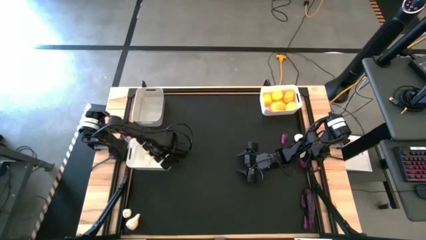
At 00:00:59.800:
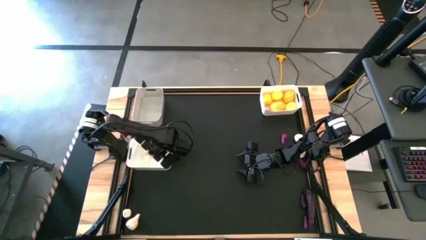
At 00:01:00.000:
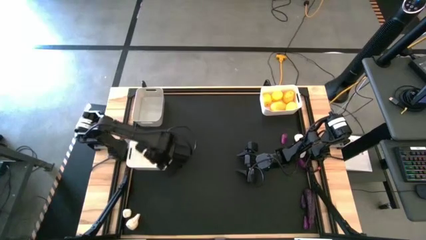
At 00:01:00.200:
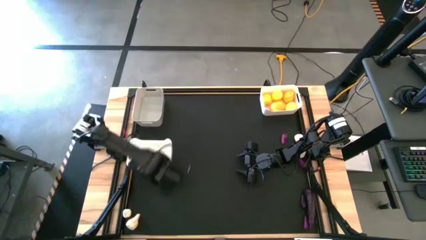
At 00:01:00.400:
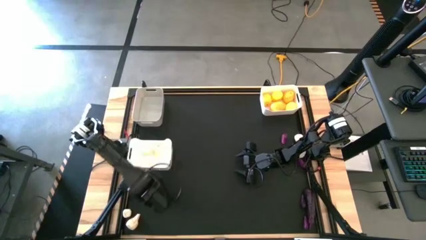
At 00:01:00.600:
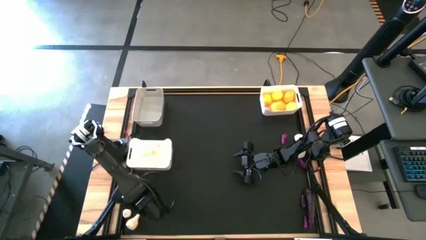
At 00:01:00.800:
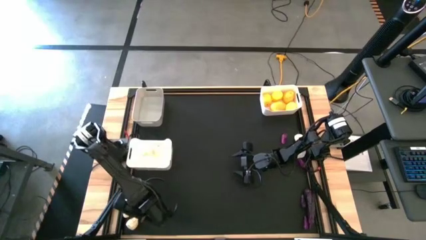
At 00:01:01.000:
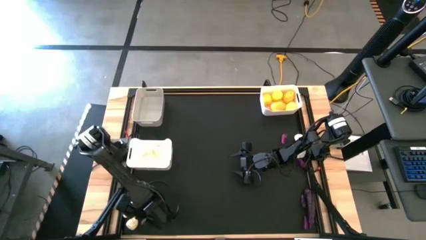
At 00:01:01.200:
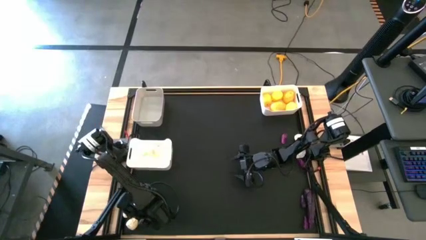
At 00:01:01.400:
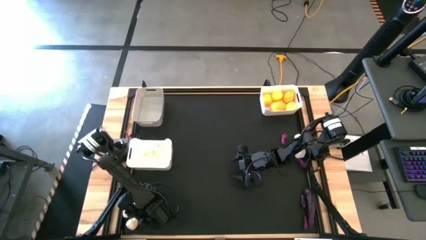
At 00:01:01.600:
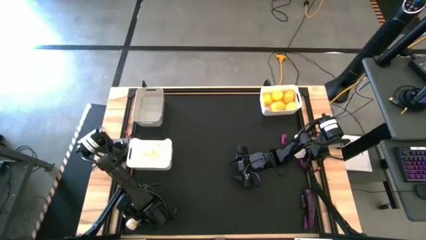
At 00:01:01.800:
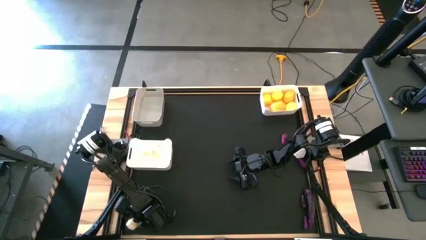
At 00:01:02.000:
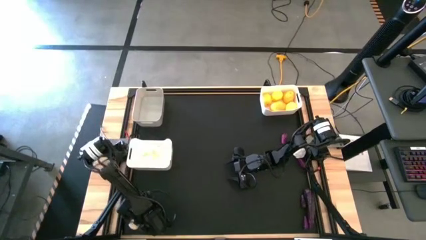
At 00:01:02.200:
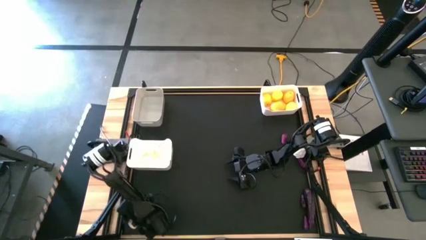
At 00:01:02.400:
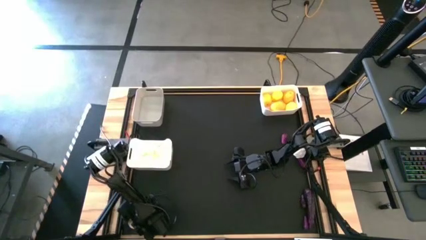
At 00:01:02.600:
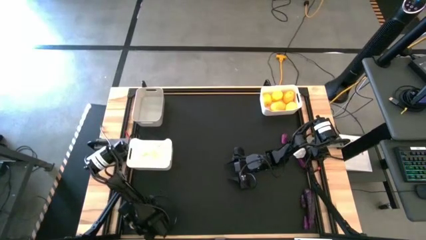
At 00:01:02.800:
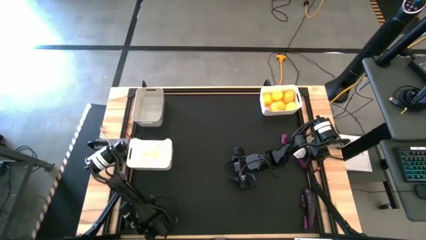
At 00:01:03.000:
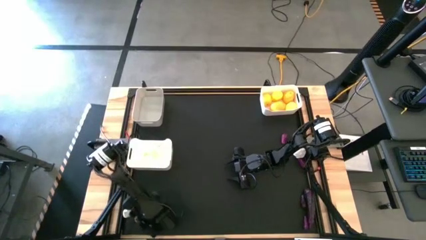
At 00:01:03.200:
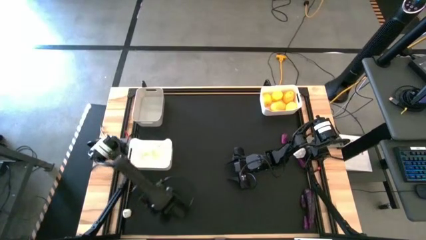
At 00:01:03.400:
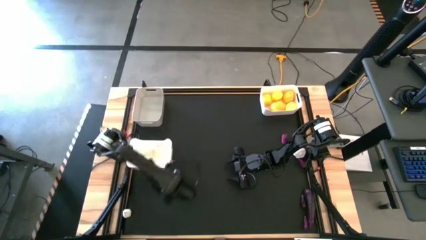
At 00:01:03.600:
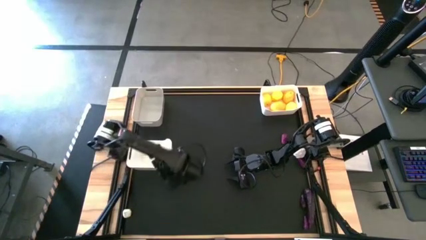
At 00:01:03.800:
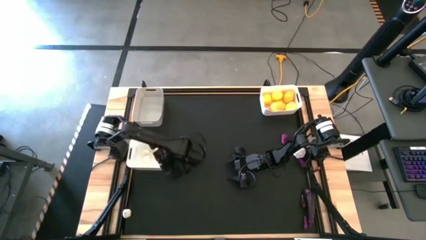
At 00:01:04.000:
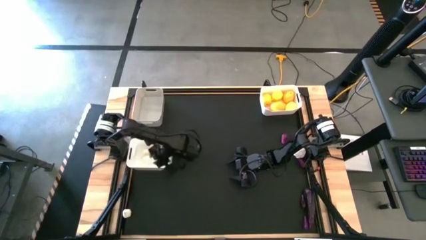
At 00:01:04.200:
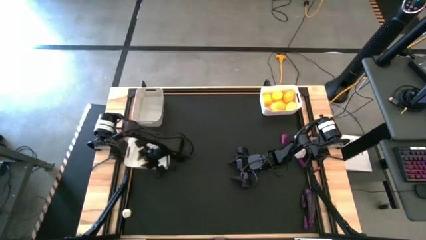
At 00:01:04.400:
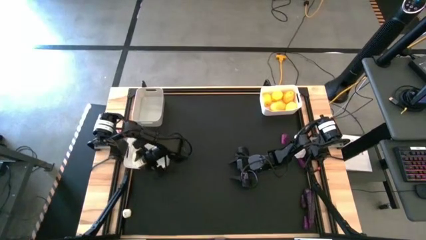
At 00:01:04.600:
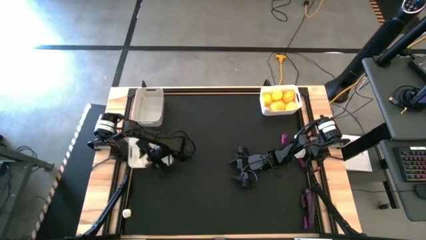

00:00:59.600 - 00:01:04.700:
Task: Sort produce into baskets
Put the white garlic into the bottom white bin

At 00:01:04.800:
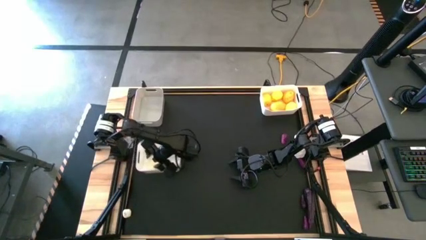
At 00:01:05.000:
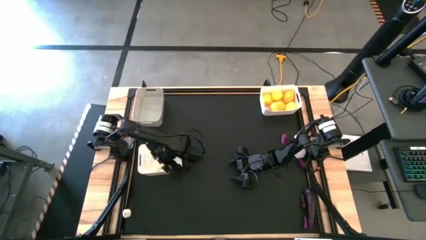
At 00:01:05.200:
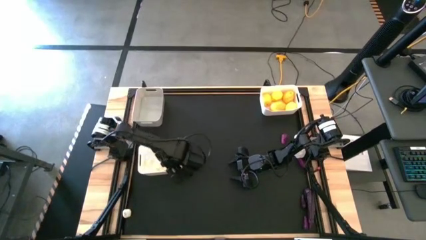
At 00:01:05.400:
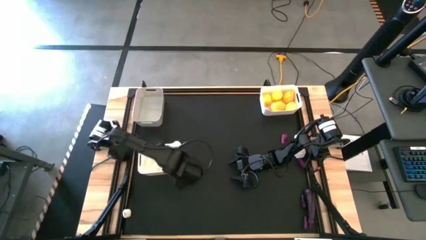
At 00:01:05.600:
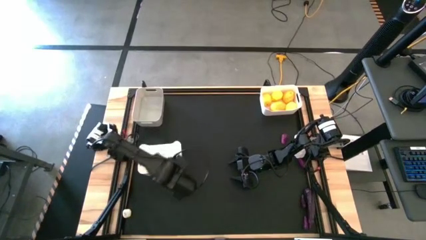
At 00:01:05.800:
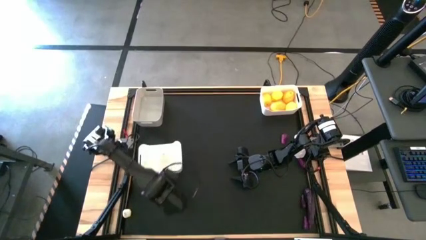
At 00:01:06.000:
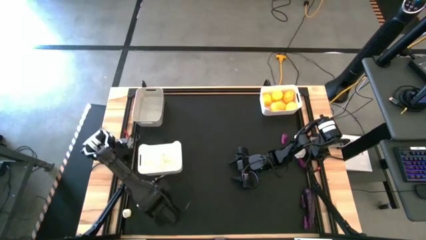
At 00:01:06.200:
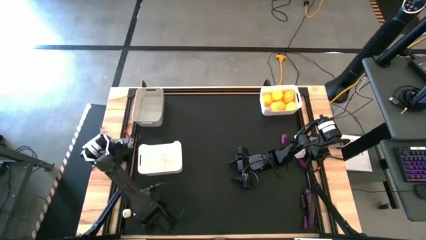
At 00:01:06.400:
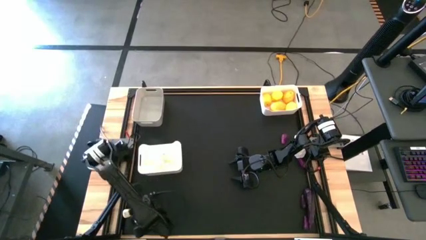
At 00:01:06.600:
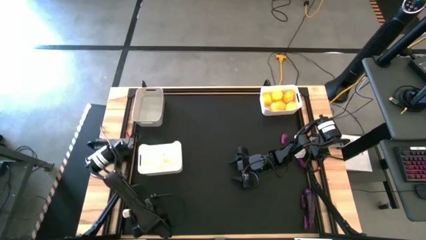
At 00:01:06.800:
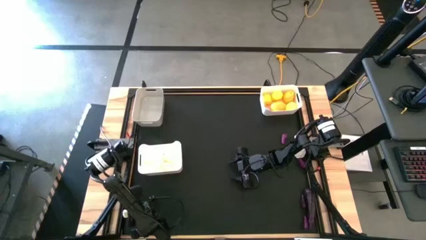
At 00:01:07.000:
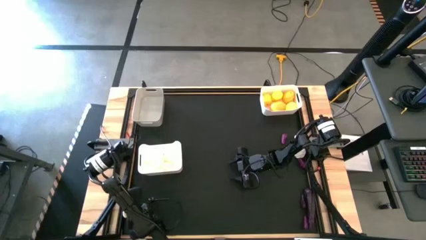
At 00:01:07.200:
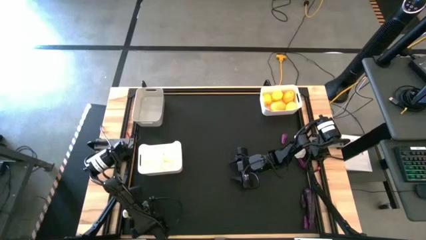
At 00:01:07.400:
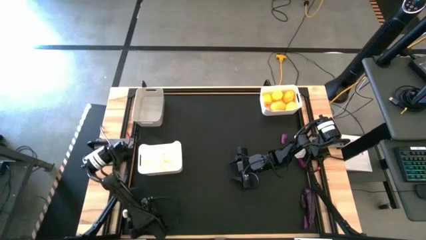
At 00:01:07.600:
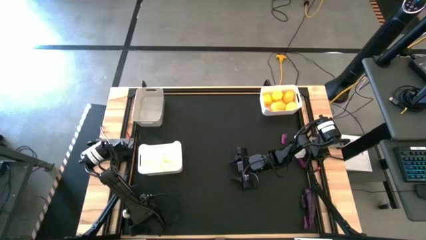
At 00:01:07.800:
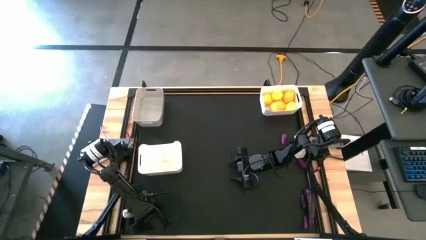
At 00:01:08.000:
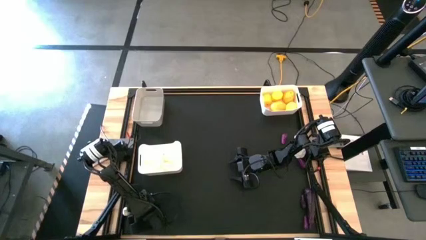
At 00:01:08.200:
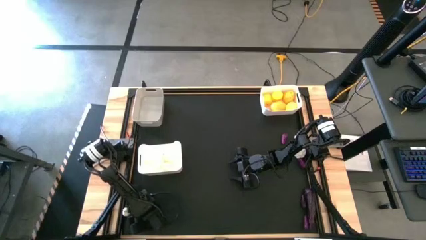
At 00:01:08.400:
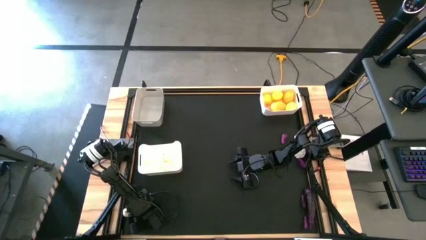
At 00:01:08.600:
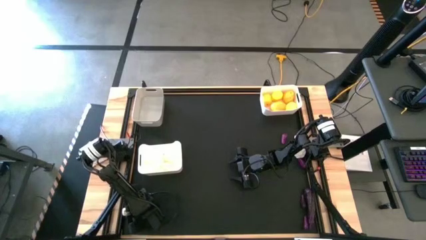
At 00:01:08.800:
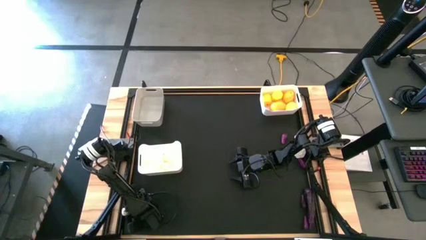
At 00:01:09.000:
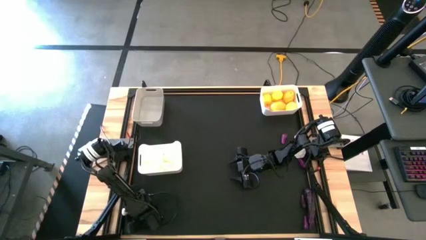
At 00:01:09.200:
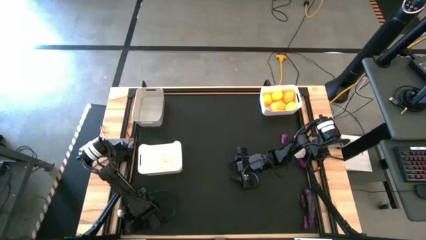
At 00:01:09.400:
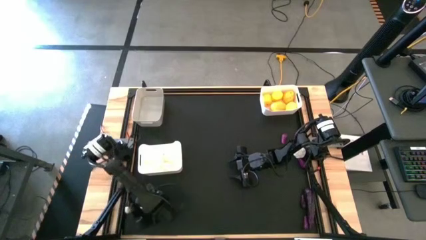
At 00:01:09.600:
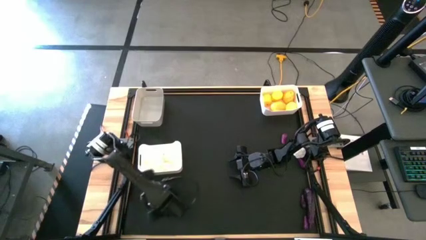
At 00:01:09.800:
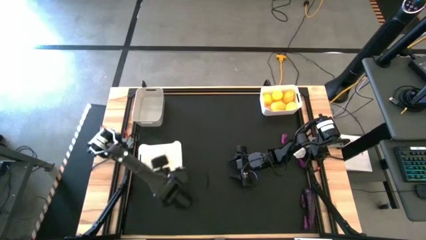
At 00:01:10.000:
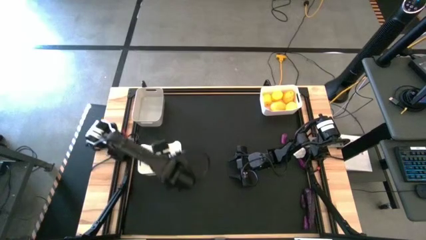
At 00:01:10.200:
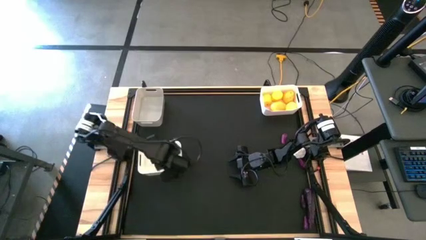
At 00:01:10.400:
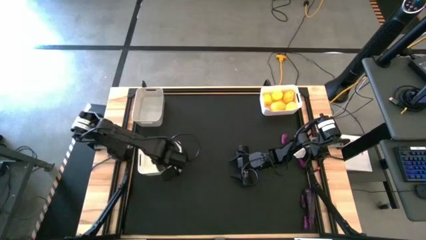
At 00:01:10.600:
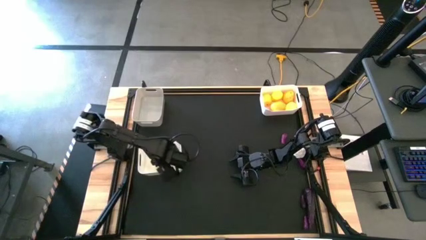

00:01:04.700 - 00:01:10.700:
Put the white garlic into the bottom white bin

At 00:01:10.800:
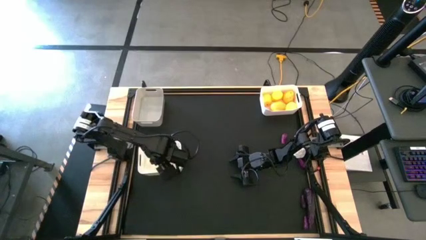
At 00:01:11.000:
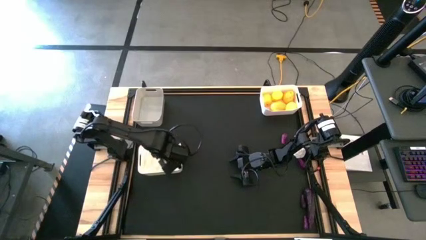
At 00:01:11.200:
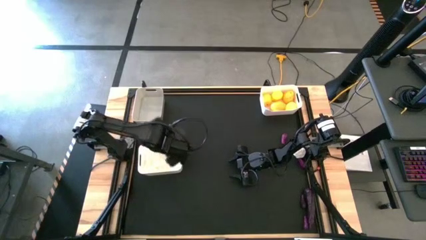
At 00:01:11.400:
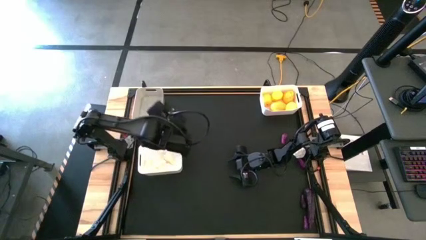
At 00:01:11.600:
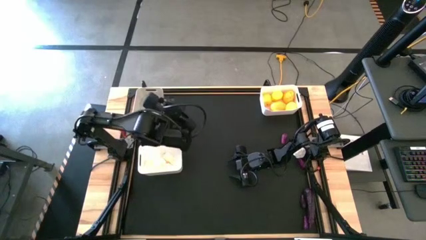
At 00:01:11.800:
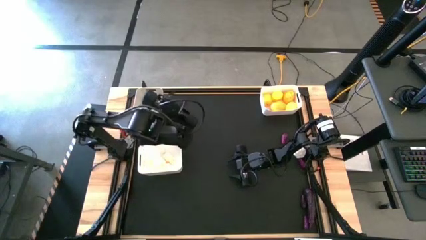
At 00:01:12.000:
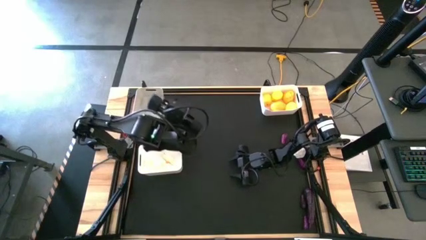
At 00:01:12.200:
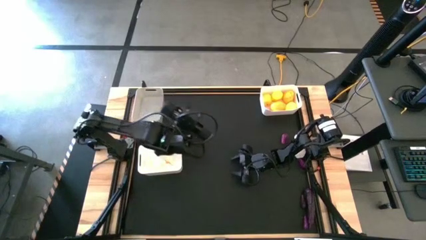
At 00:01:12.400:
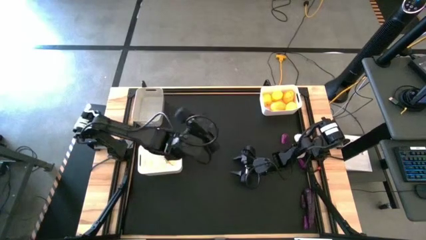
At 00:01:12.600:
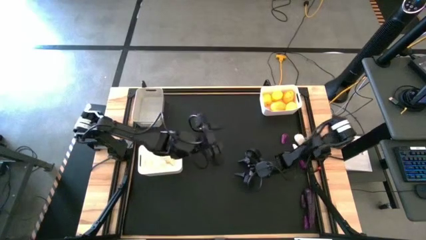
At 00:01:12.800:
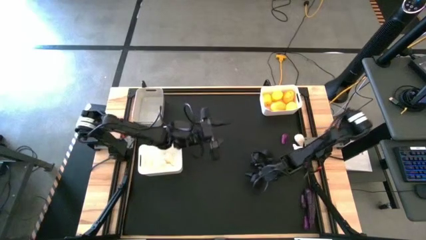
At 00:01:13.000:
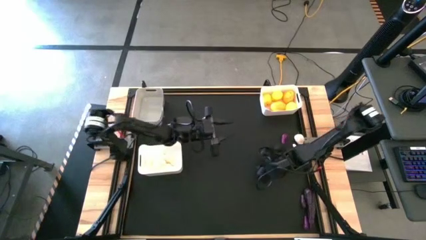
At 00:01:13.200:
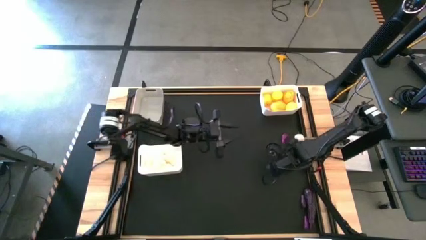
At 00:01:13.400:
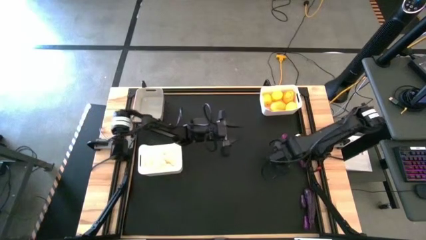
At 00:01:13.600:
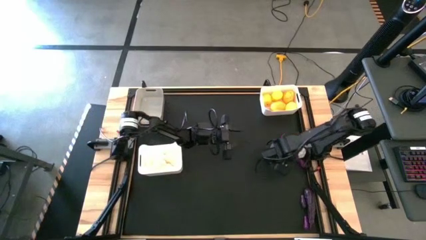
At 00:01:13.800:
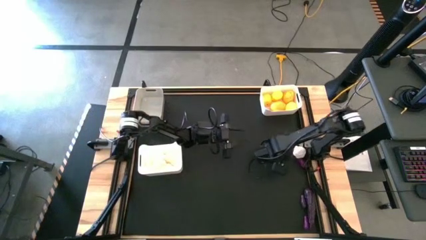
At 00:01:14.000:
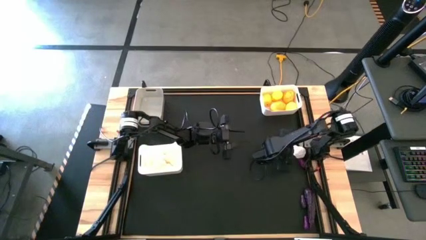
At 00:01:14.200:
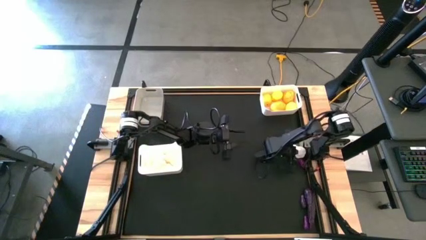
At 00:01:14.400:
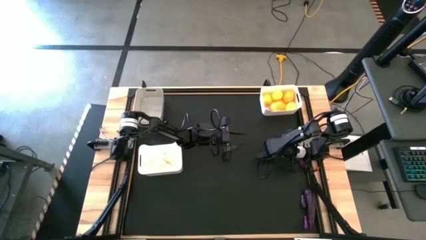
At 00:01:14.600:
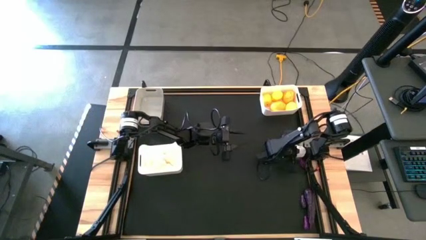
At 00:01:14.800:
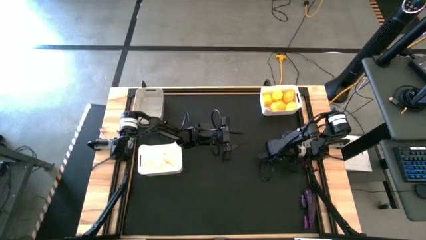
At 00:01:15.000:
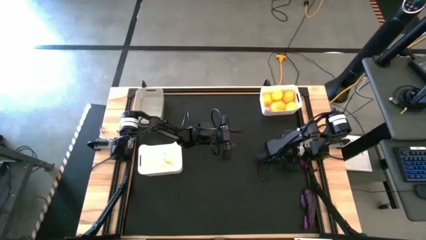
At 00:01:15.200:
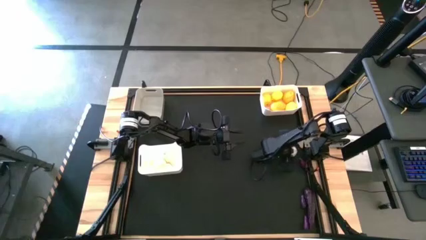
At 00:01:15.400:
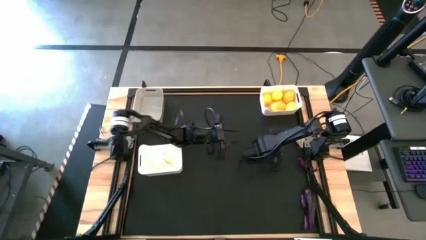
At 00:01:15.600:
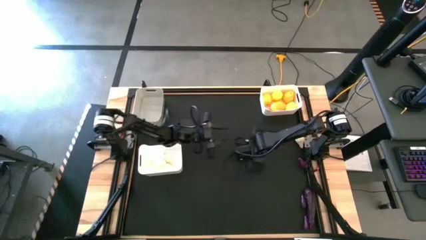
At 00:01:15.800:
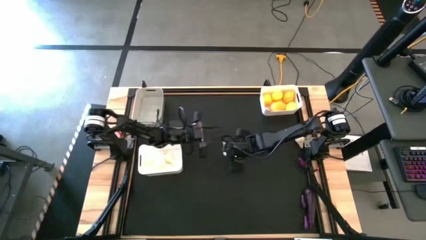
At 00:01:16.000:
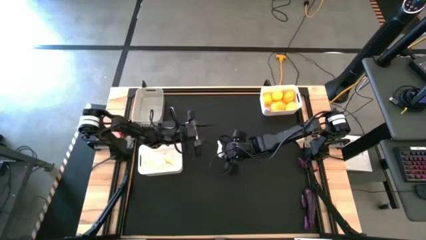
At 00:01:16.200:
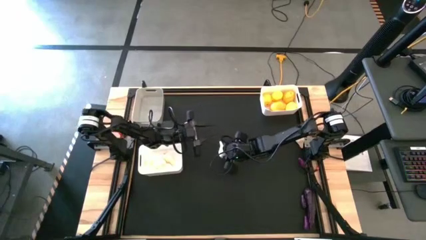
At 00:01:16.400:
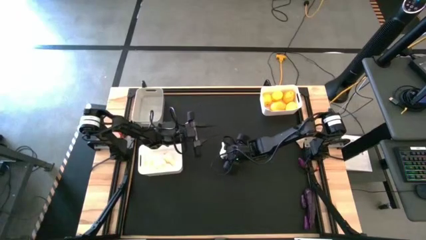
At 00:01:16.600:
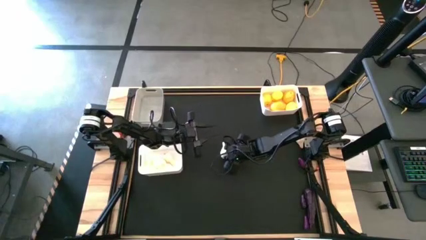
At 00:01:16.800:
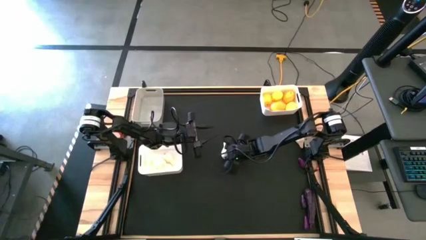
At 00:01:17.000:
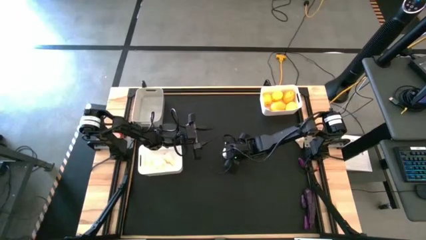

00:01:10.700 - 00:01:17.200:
Move the white garlic to the center of the table
